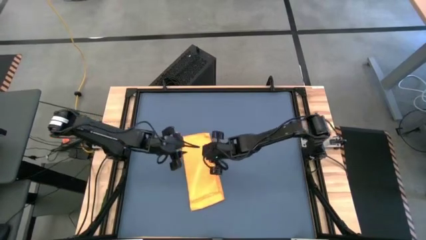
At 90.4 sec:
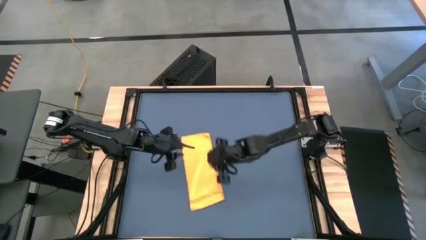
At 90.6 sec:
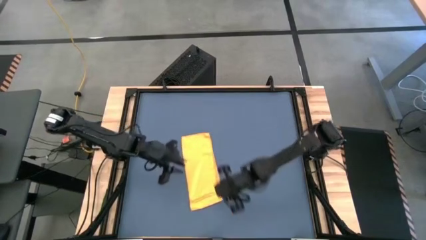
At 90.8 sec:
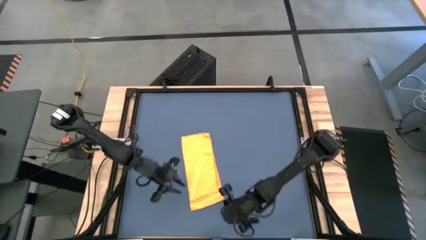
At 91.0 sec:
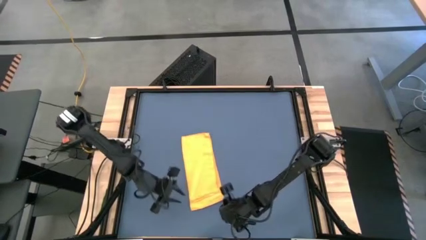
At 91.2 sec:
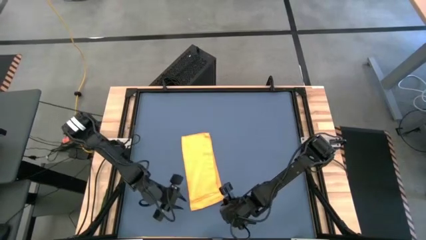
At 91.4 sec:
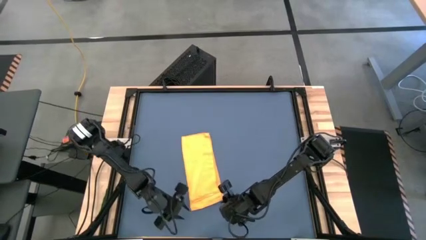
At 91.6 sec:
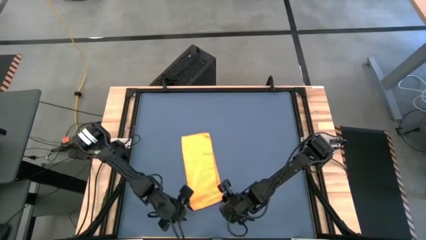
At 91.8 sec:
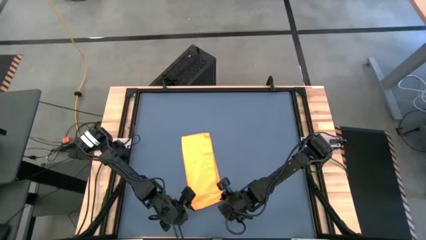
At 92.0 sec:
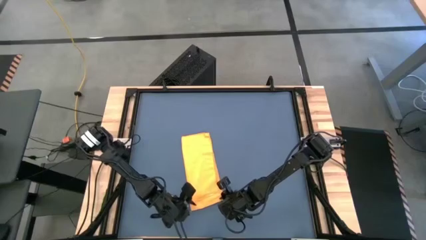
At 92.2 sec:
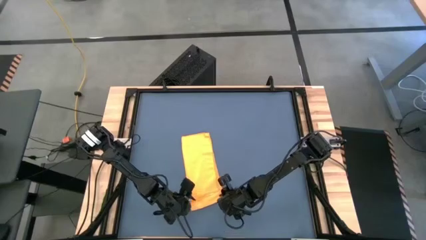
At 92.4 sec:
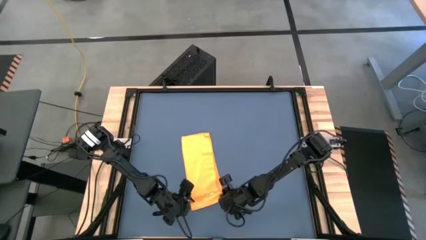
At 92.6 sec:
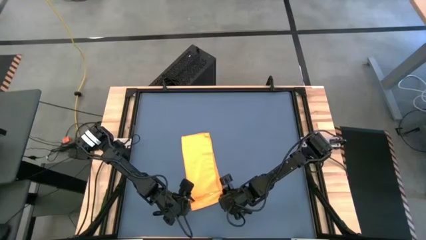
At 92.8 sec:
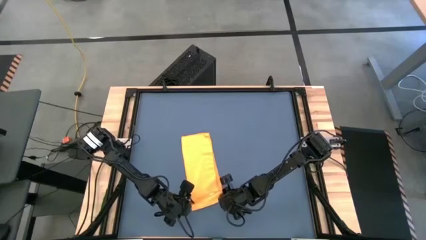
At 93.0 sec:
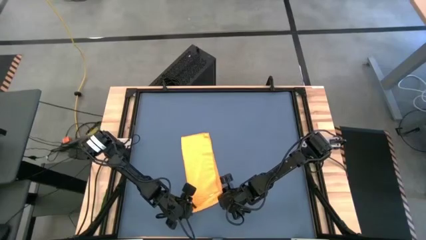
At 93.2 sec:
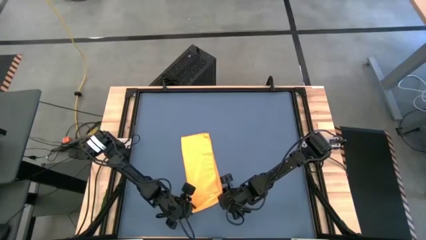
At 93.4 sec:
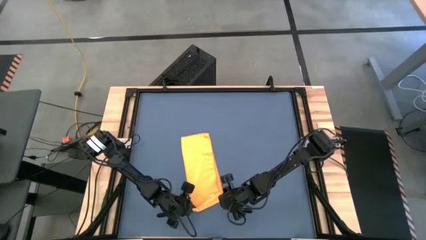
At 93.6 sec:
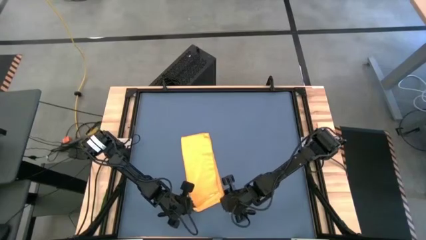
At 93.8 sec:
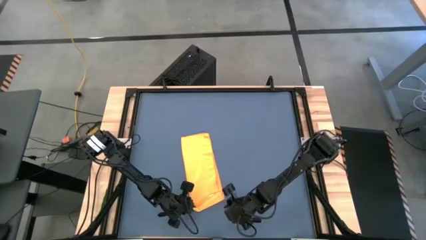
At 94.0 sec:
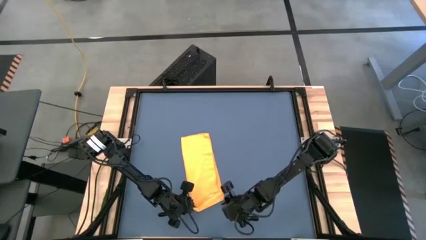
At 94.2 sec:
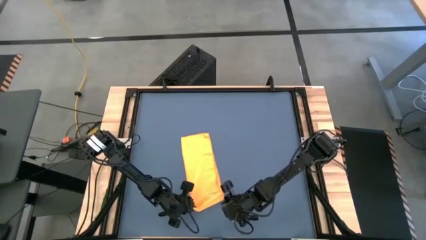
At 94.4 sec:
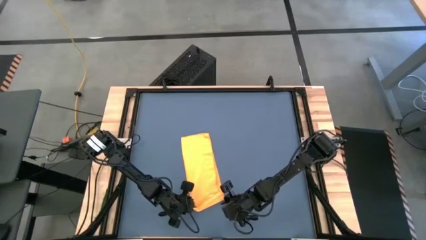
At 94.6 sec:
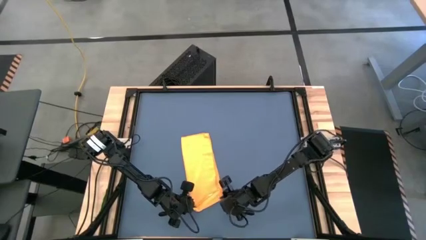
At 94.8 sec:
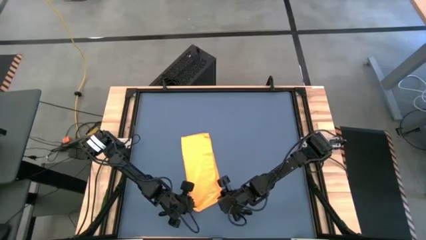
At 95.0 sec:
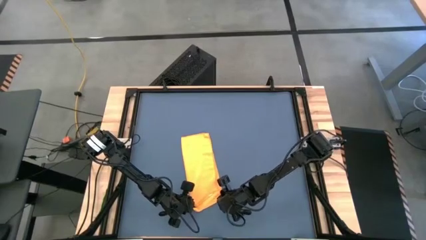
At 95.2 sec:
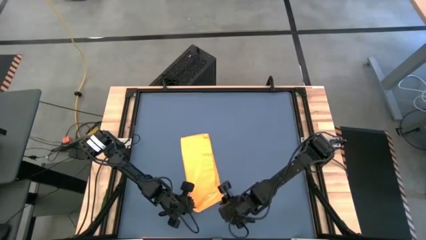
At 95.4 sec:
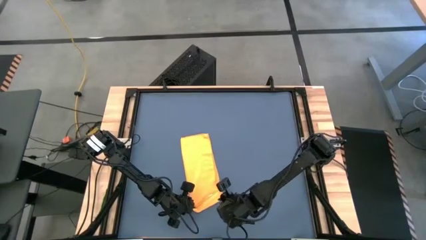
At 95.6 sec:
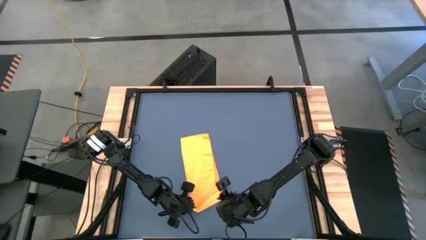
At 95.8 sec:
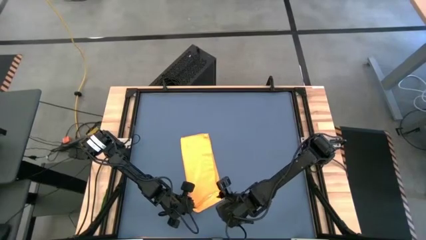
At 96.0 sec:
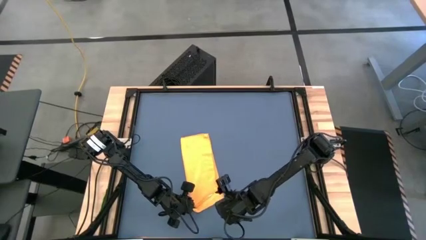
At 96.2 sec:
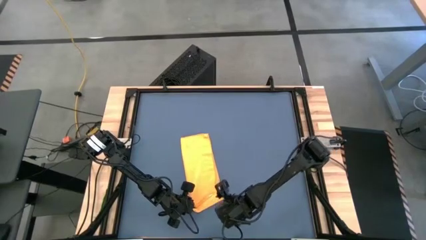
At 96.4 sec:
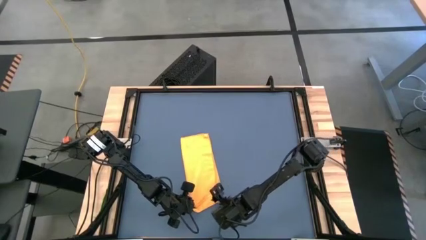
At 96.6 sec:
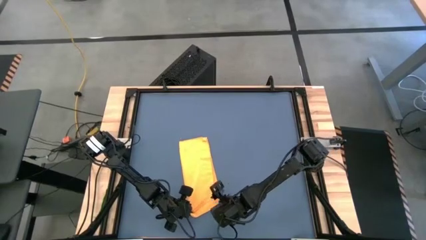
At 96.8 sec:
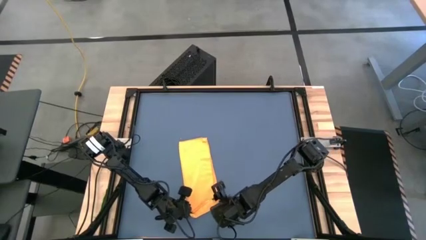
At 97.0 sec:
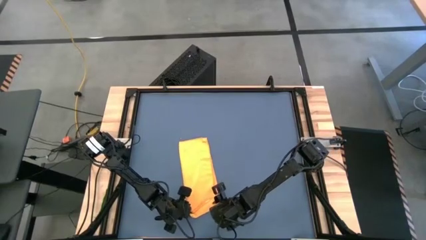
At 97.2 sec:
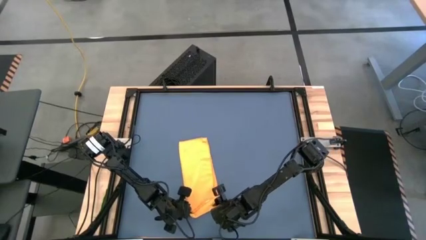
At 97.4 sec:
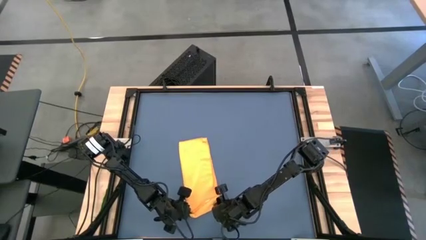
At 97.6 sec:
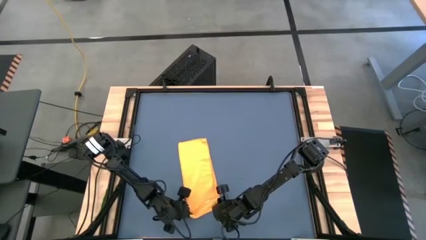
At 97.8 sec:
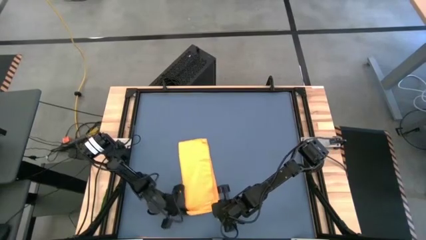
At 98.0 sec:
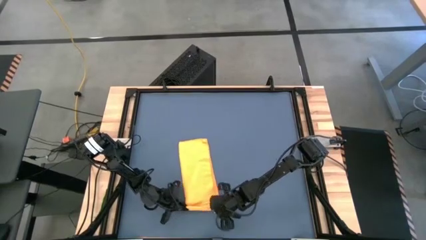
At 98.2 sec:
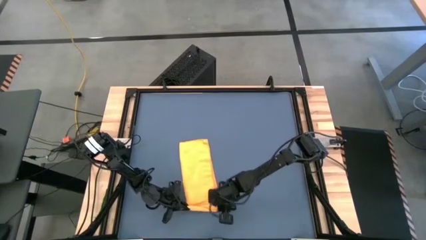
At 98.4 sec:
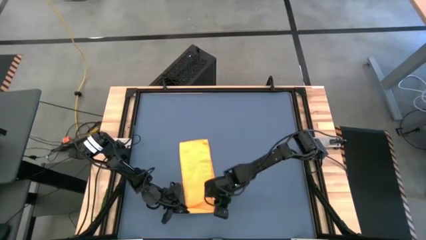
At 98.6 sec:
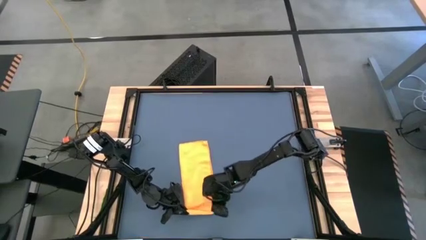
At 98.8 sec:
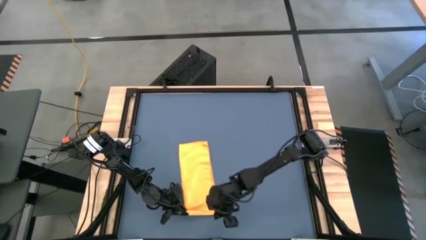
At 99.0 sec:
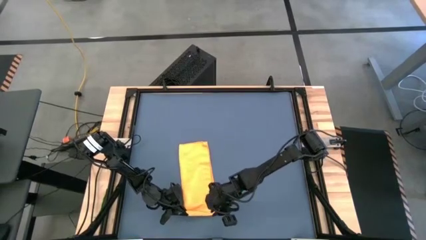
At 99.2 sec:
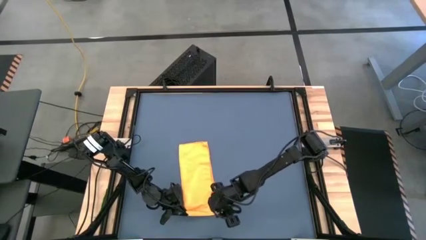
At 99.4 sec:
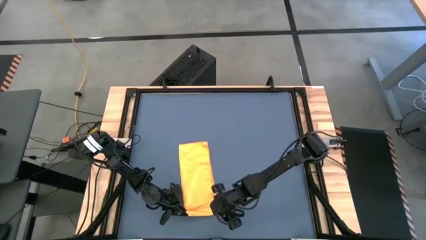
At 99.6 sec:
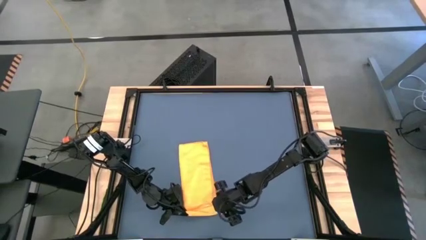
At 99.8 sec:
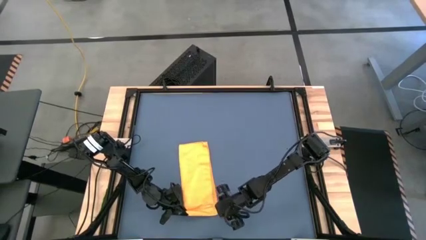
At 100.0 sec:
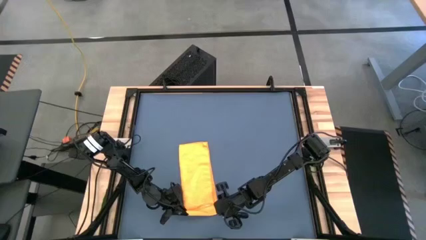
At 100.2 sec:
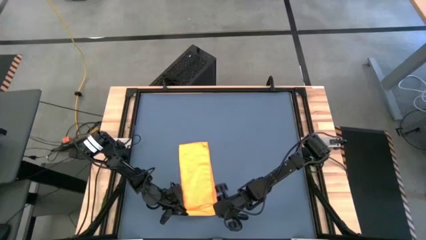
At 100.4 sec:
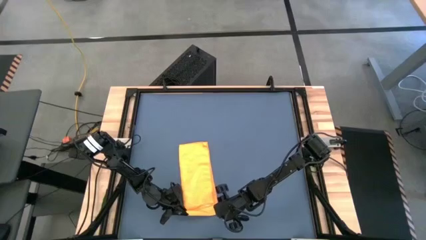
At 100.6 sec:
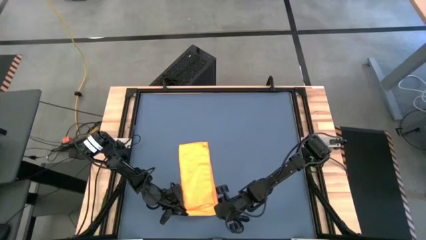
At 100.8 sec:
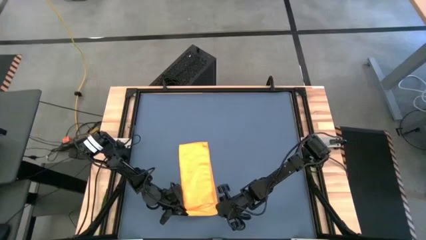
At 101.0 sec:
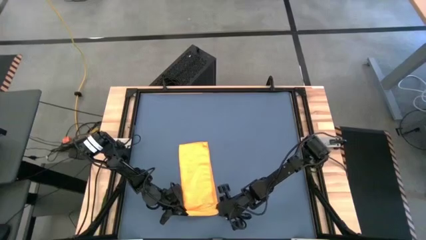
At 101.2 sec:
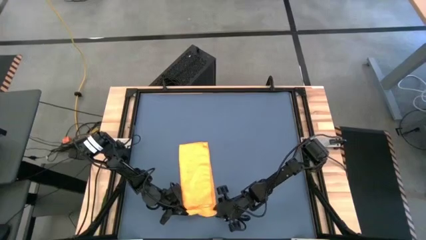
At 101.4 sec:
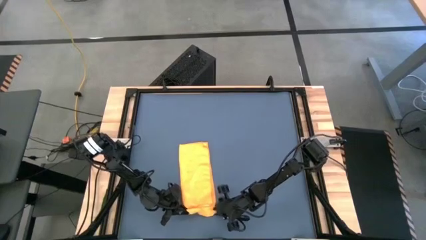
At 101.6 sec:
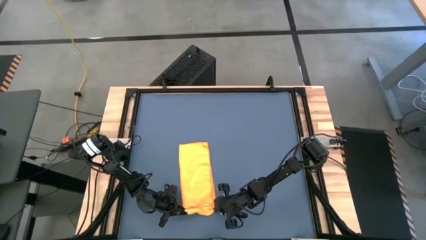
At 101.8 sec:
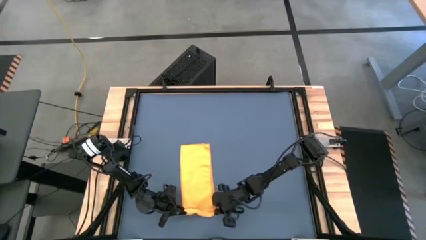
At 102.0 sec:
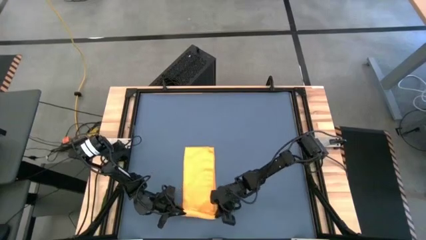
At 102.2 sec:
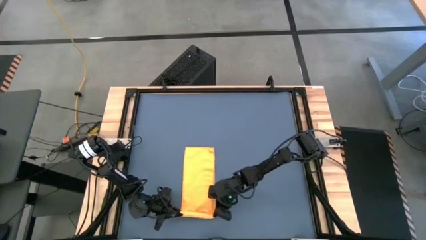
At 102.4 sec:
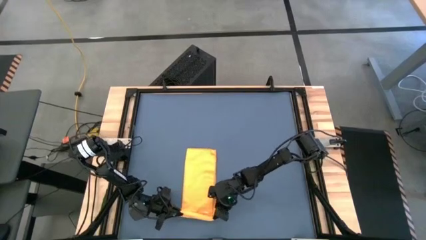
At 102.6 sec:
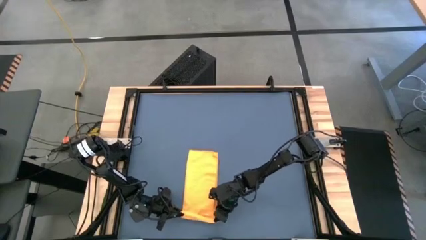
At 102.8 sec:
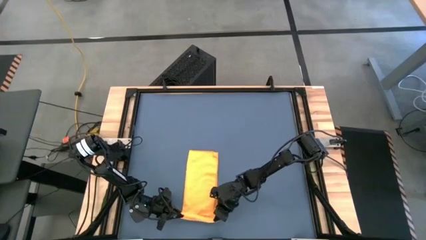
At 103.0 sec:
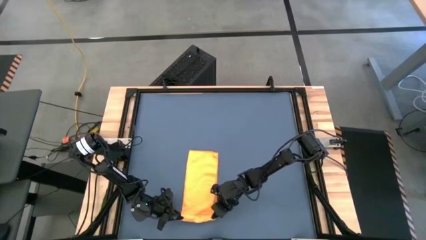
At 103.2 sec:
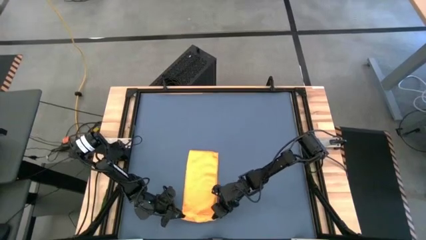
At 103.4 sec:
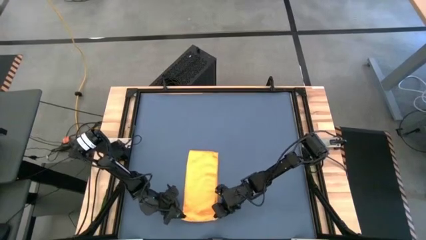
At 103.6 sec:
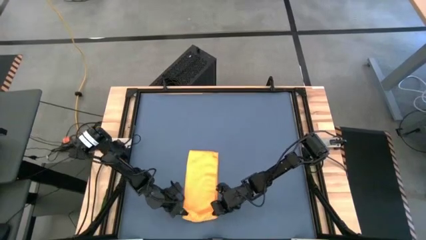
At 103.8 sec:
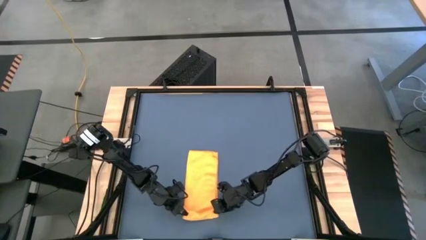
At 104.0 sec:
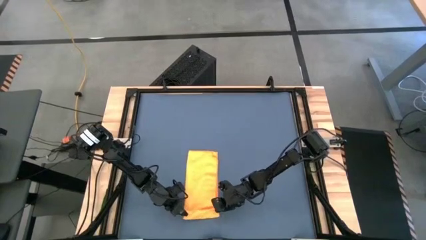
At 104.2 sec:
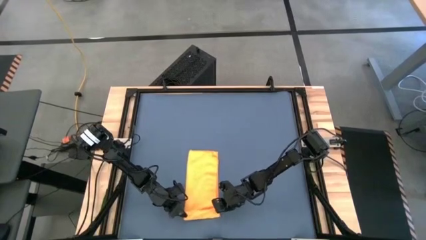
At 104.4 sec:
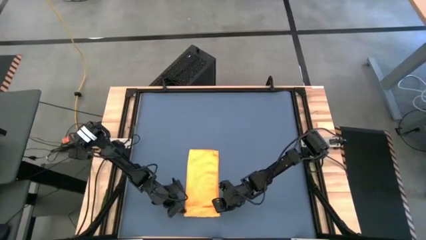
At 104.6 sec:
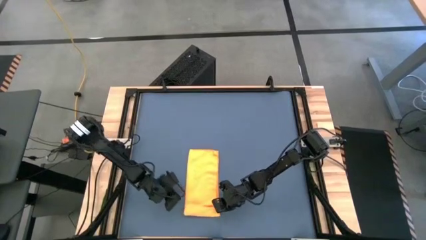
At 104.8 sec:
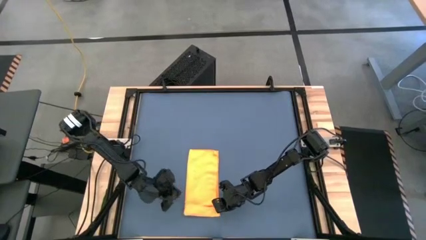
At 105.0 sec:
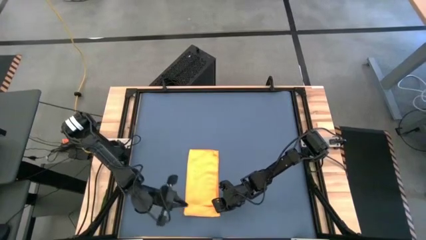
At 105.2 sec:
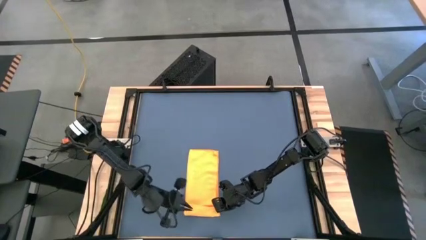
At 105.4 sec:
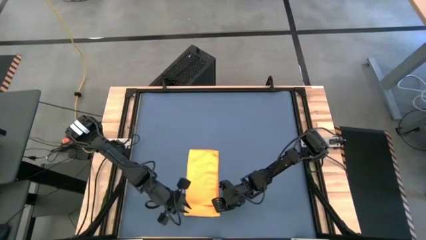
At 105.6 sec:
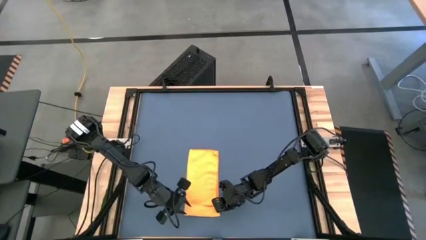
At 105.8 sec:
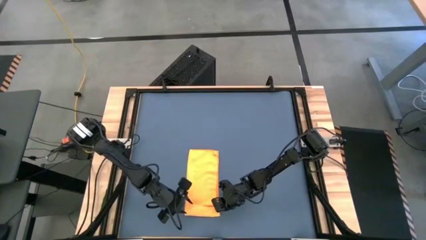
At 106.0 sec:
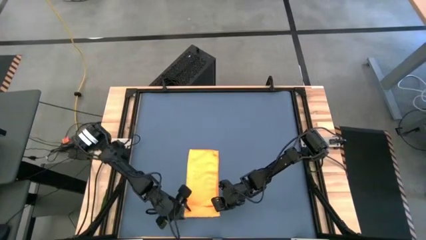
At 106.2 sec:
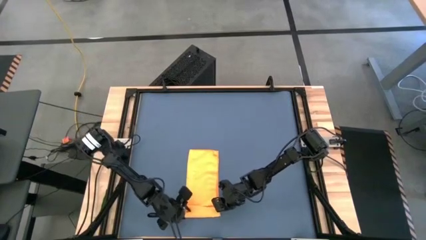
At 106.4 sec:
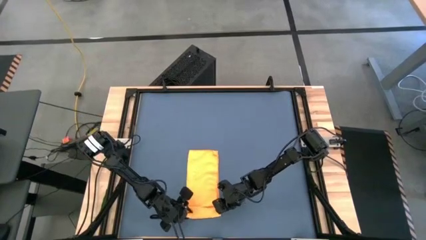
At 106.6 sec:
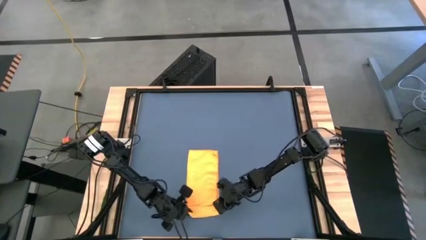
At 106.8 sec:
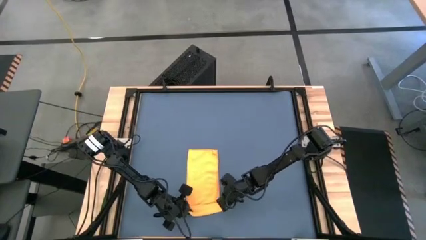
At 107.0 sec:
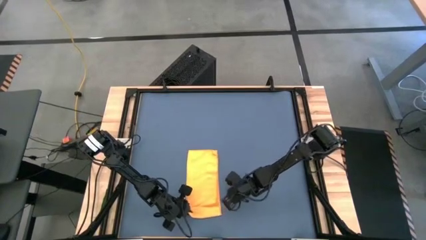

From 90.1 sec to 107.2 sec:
Task: Roll towel
Roll the yellow towel
